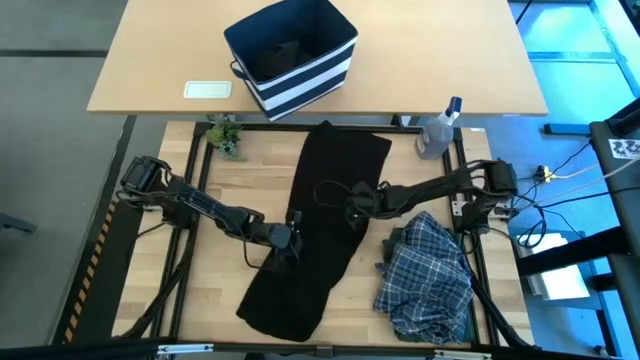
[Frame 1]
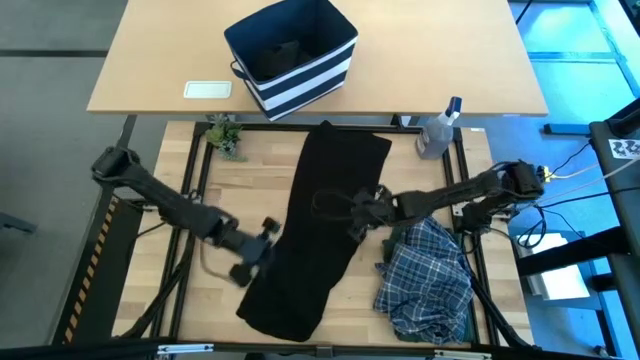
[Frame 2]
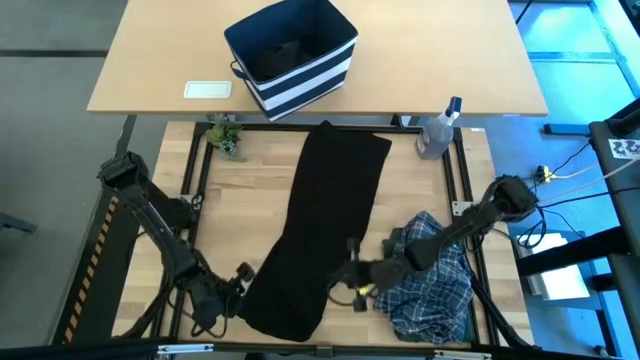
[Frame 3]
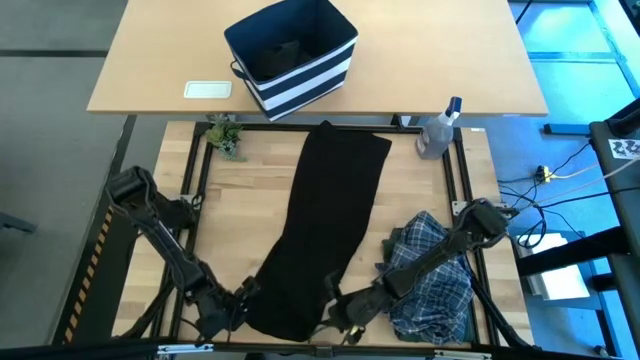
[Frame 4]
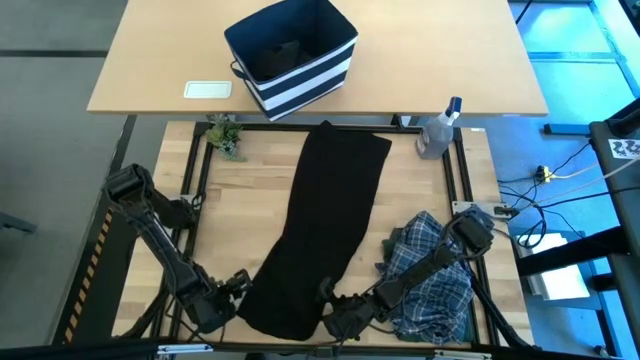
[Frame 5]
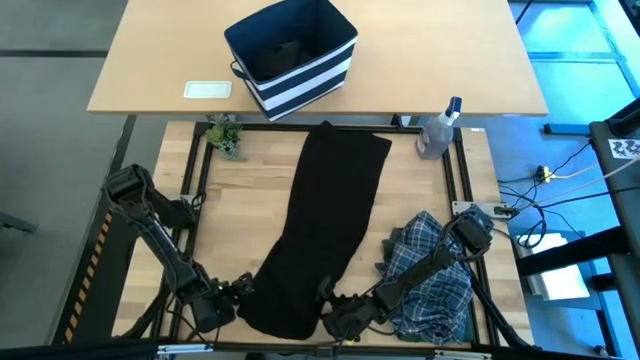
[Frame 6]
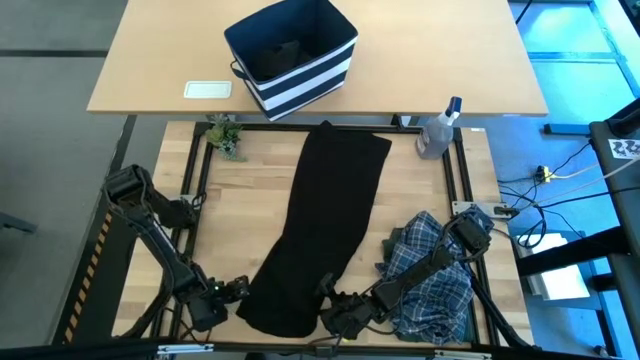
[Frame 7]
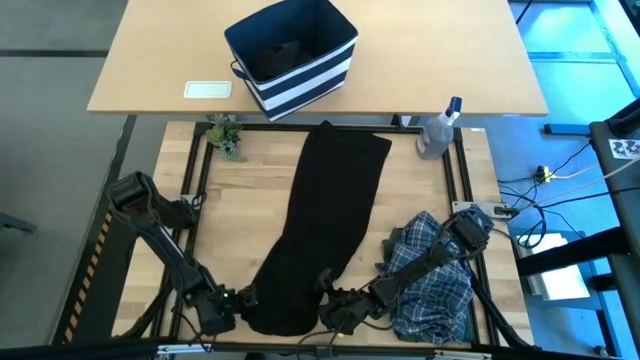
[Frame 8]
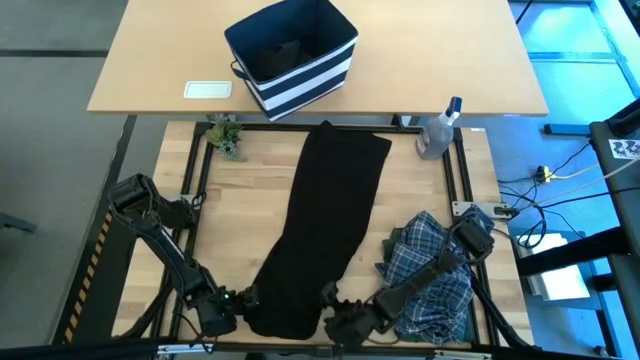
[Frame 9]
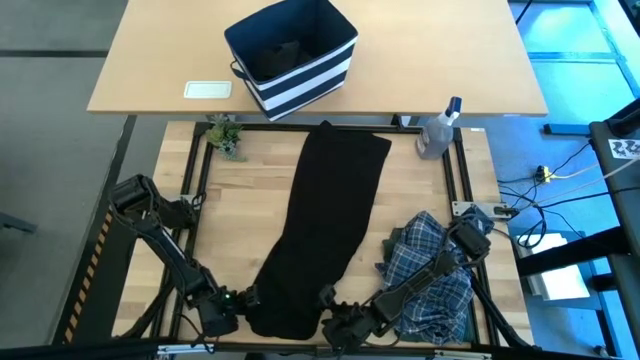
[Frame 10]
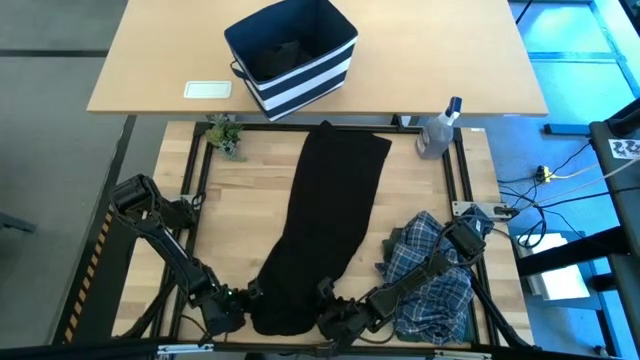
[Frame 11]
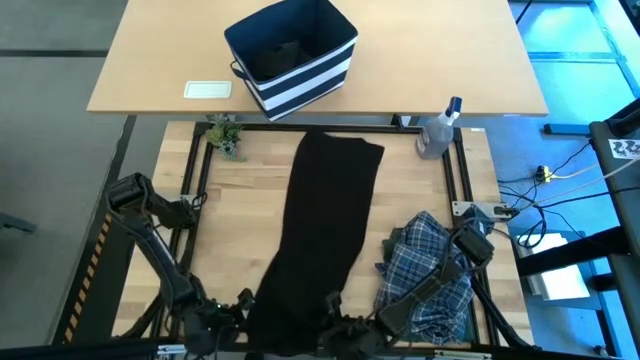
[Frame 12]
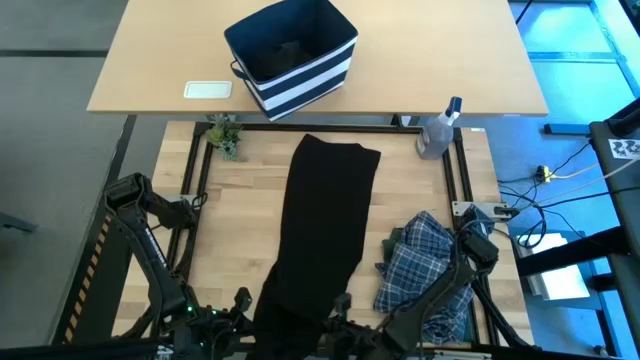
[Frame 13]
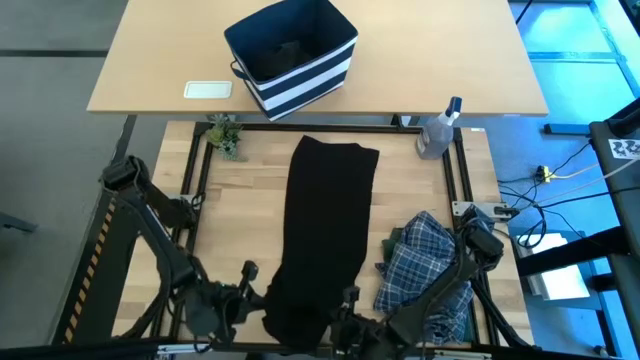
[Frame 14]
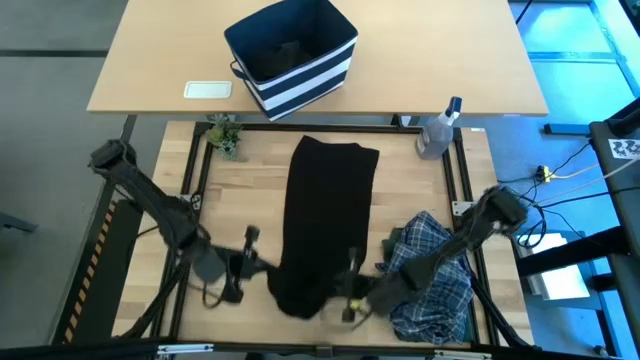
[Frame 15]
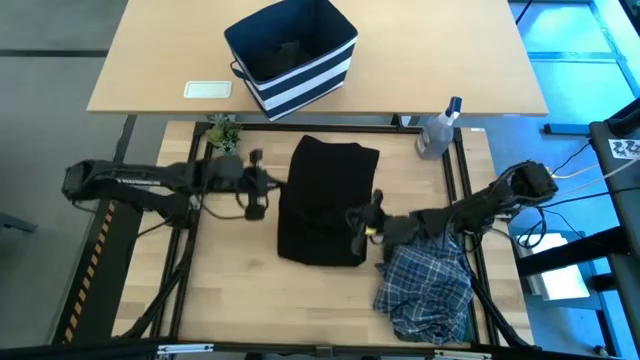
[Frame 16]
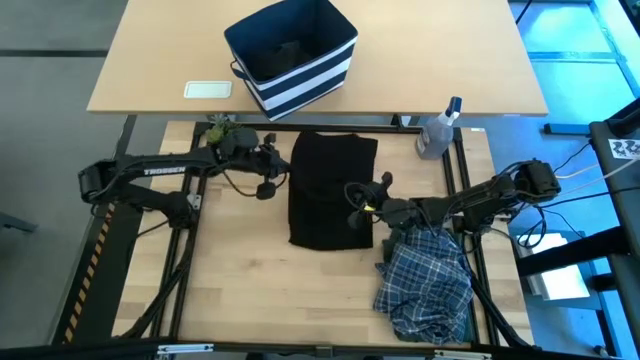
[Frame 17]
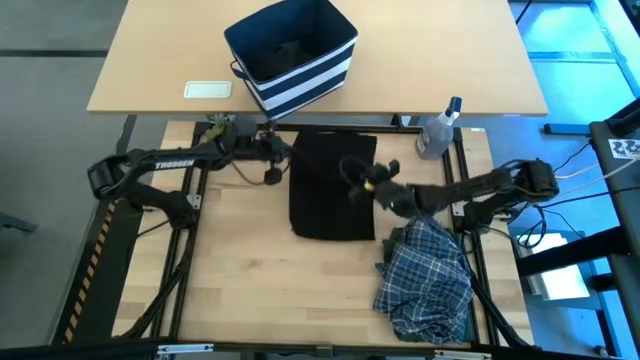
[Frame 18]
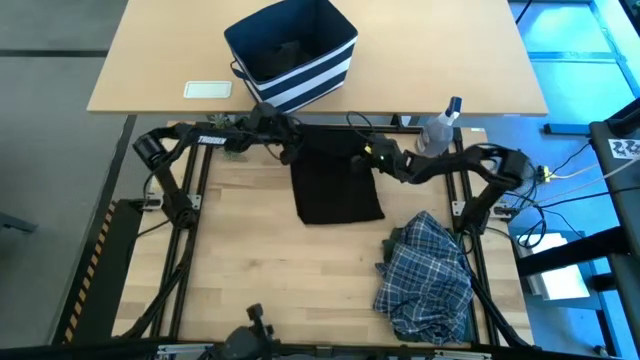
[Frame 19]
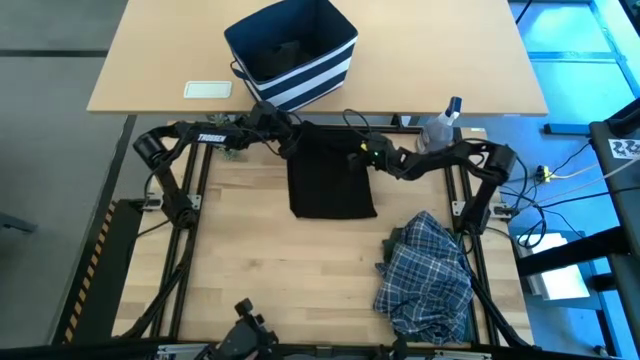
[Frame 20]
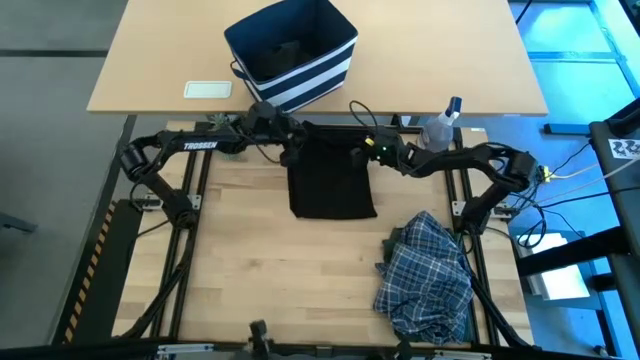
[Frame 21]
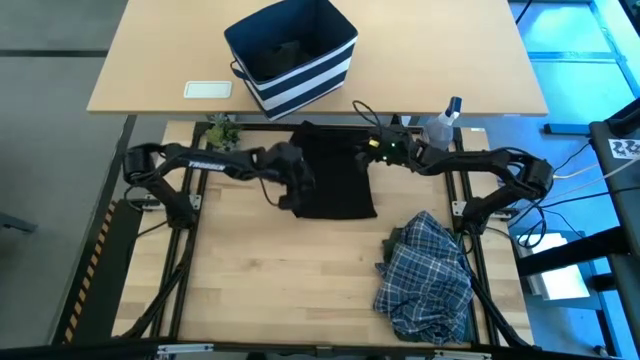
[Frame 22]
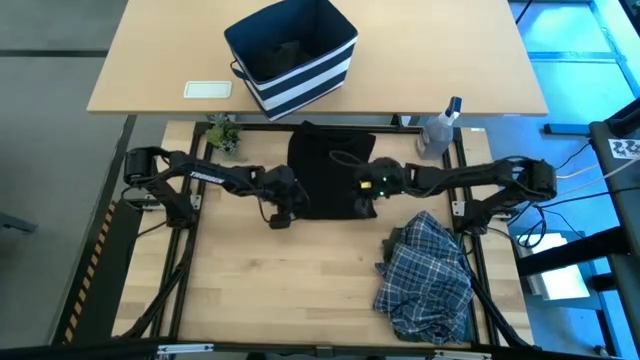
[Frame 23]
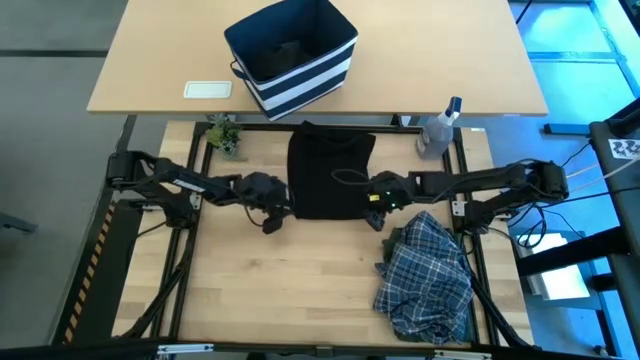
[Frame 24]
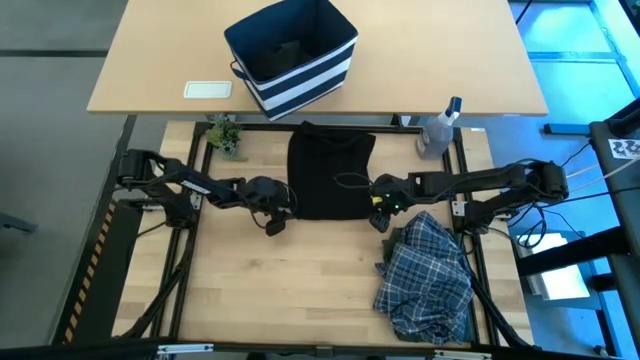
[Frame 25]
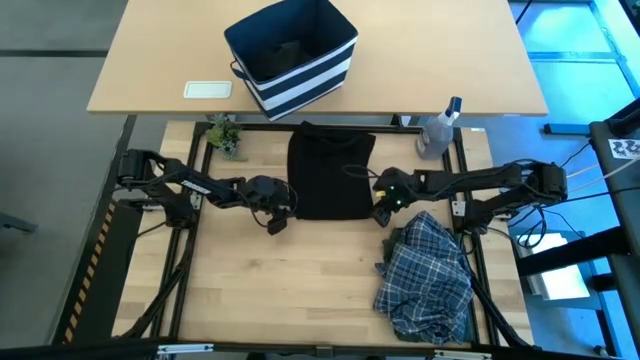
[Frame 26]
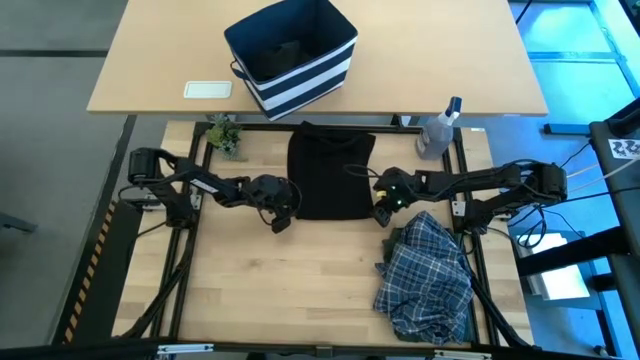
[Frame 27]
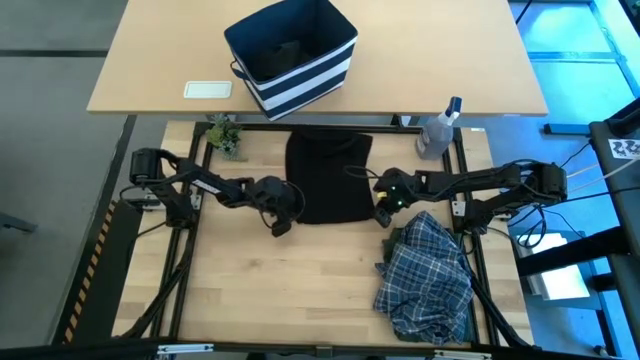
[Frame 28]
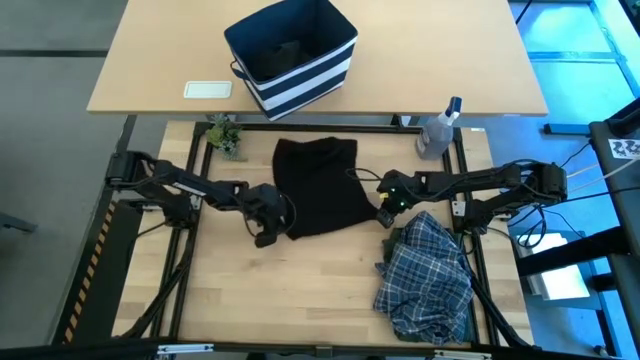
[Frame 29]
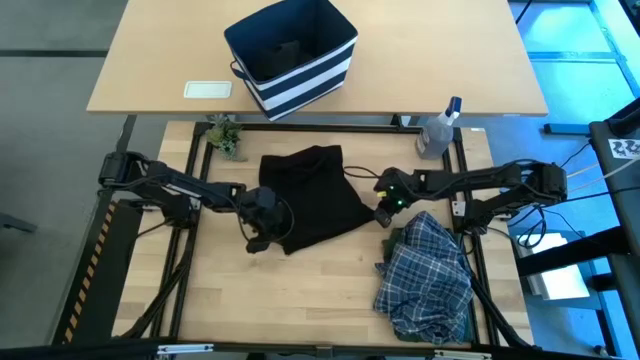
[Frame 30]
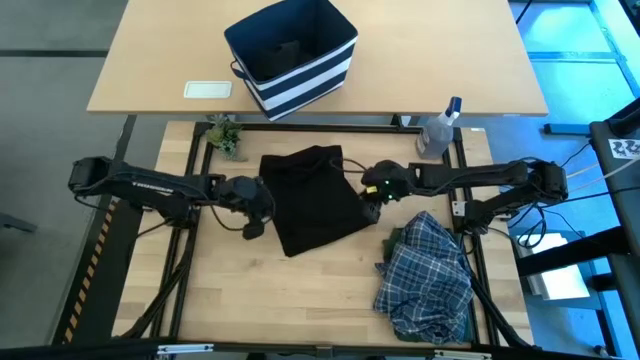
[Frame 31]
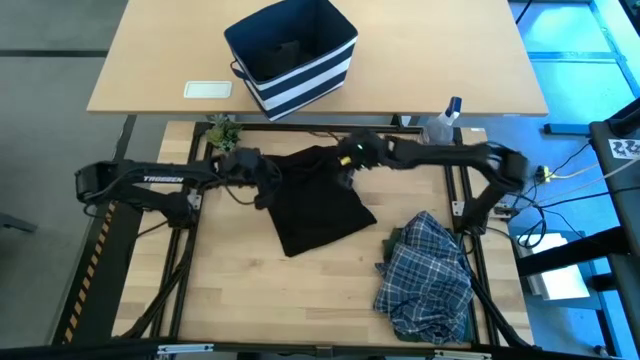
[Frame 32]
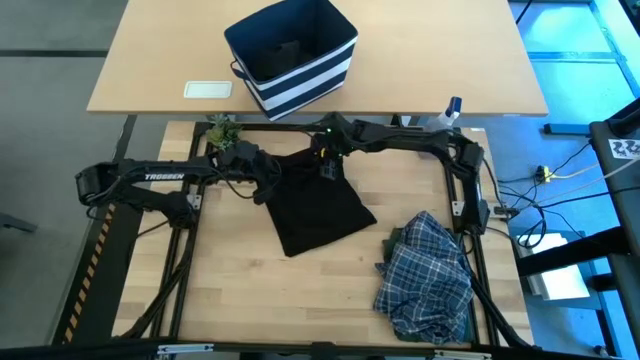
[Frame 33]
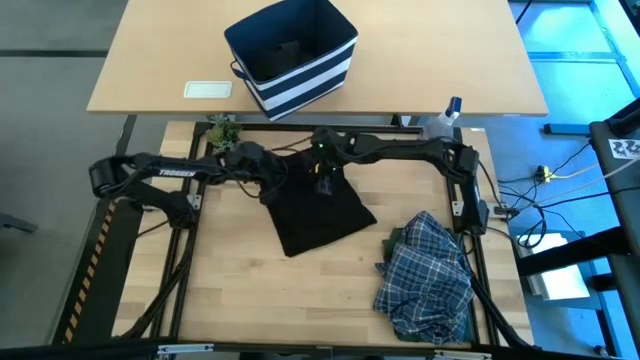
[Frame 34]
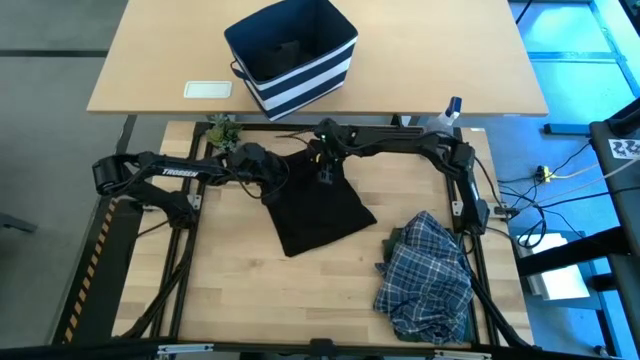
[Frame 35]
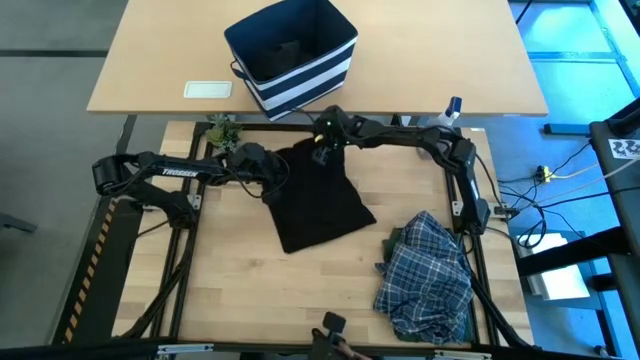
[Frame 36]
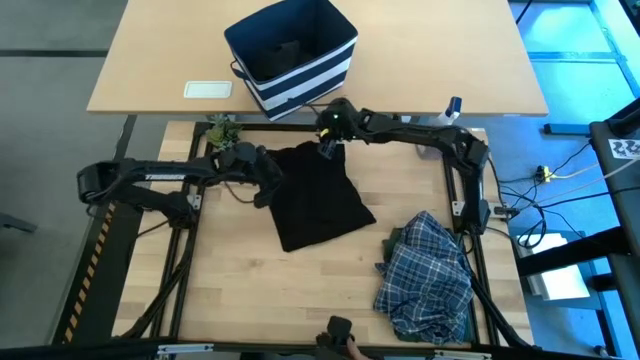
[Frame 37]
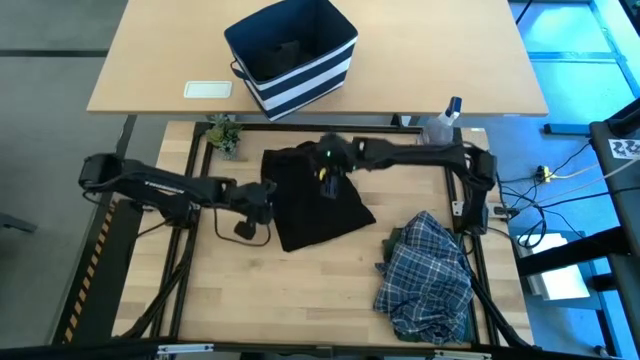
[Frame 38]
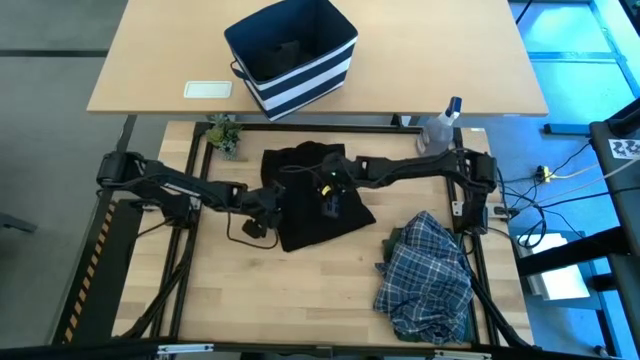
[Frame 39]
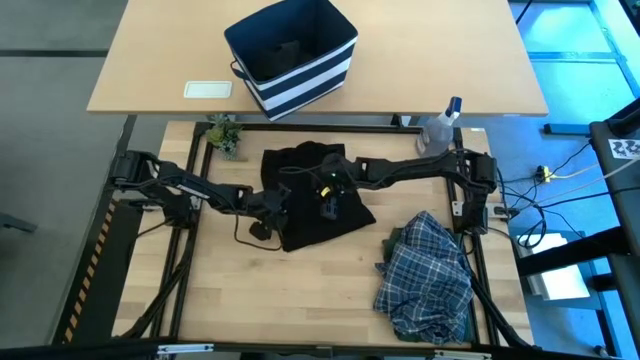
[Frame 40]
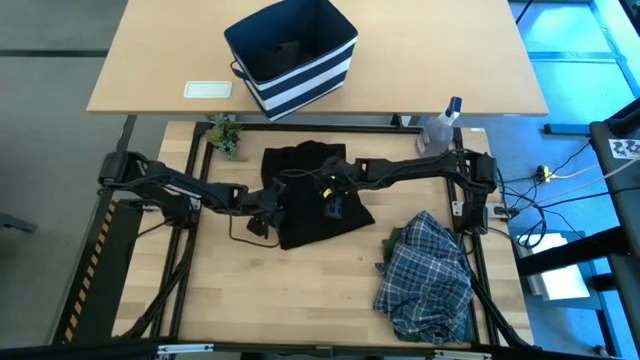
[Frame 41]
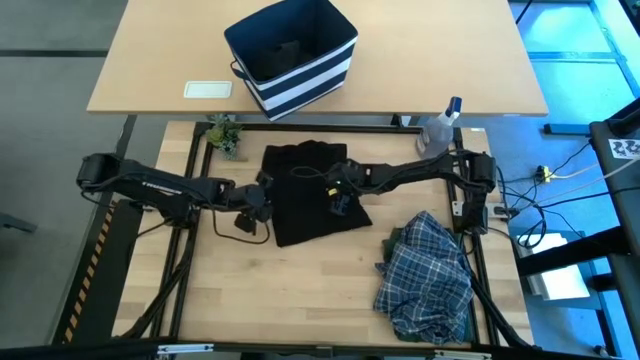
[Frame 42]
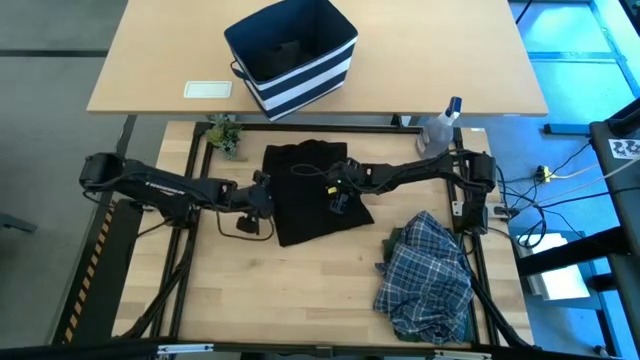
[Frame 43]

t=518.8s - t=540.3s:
Task: Fold Laundry from Bin
Fold the black shirt
